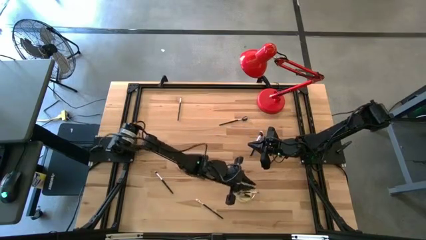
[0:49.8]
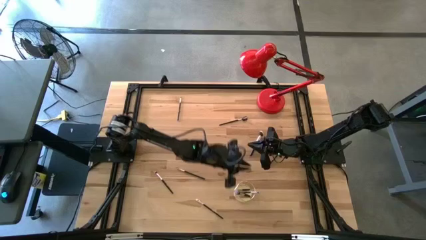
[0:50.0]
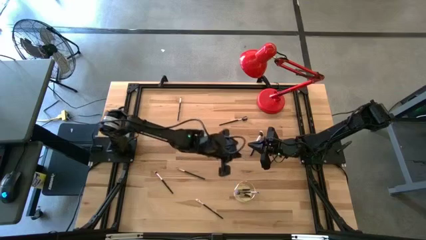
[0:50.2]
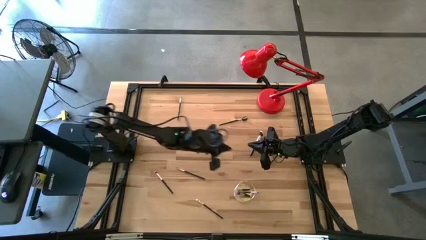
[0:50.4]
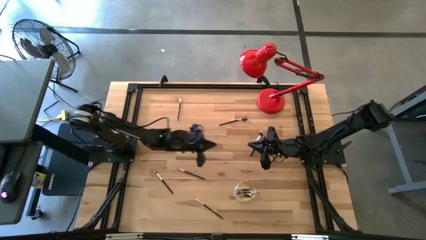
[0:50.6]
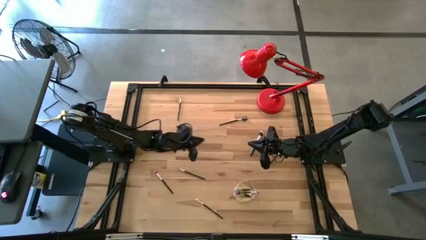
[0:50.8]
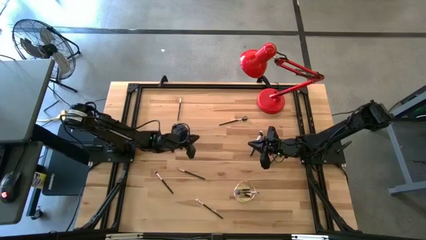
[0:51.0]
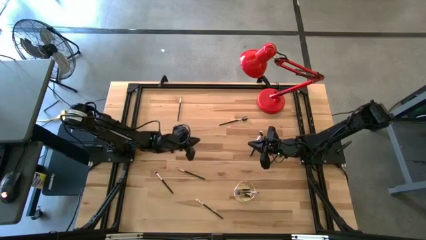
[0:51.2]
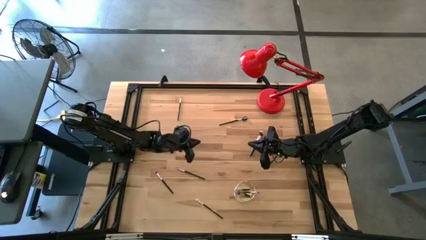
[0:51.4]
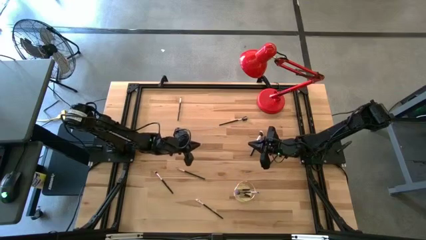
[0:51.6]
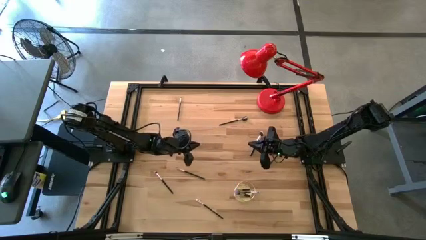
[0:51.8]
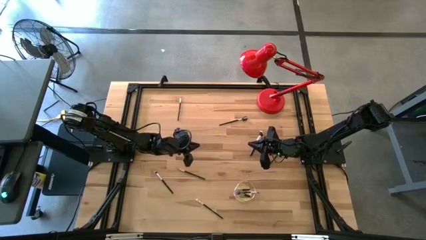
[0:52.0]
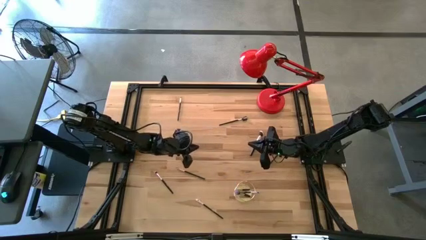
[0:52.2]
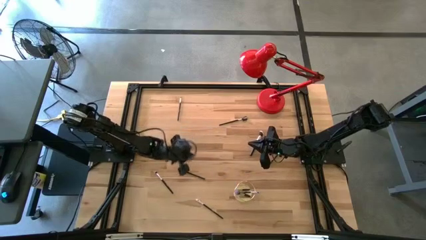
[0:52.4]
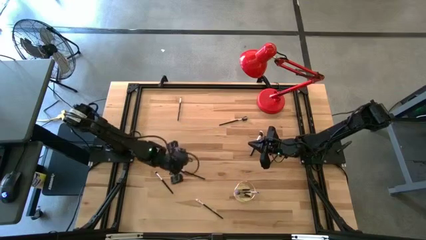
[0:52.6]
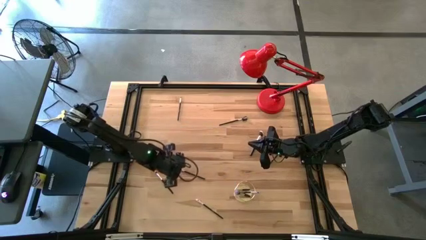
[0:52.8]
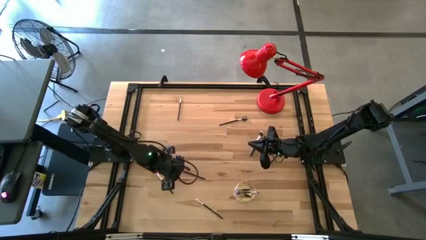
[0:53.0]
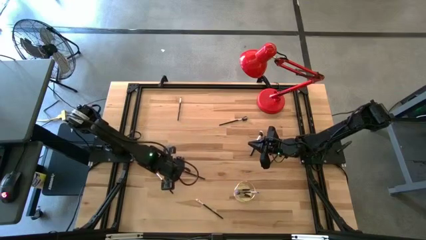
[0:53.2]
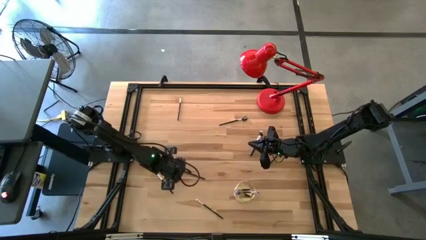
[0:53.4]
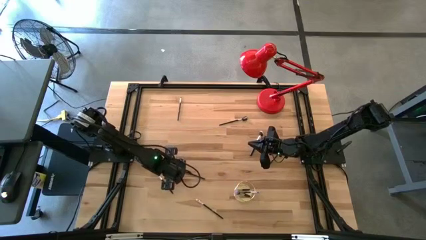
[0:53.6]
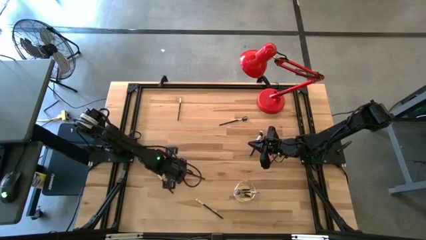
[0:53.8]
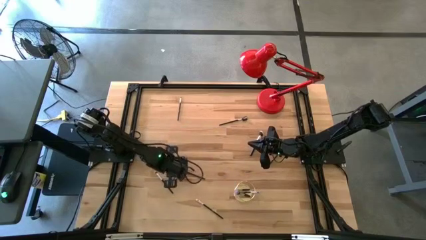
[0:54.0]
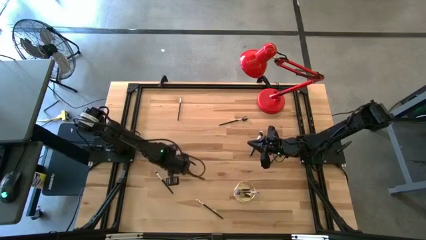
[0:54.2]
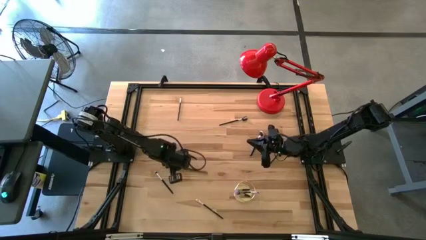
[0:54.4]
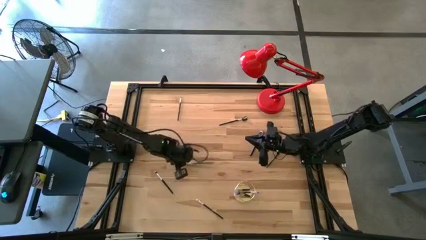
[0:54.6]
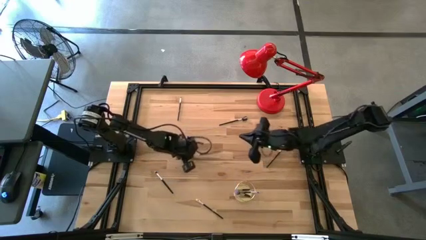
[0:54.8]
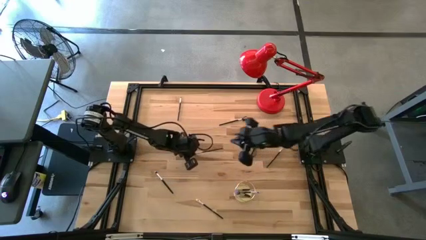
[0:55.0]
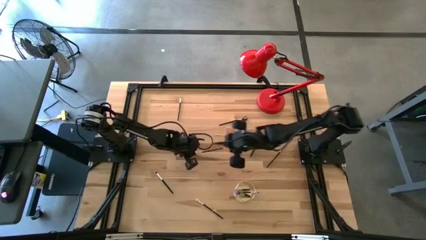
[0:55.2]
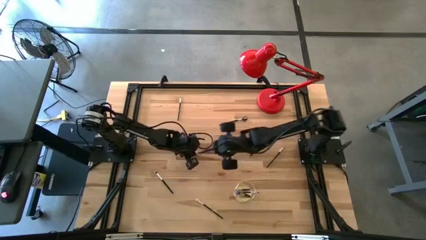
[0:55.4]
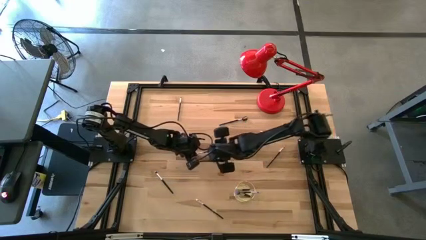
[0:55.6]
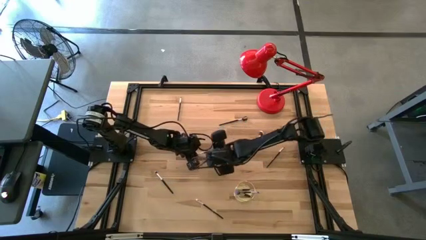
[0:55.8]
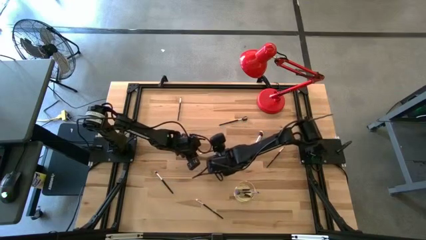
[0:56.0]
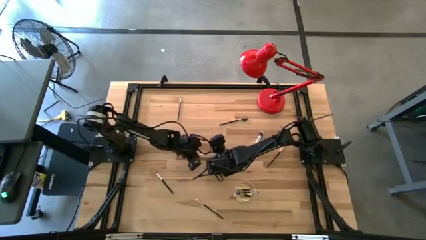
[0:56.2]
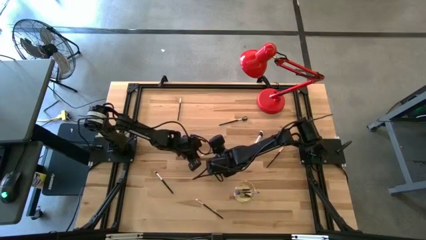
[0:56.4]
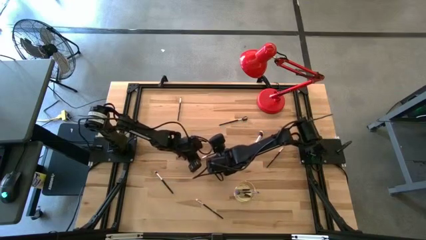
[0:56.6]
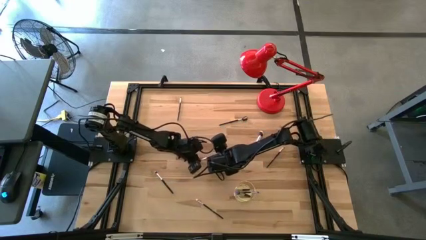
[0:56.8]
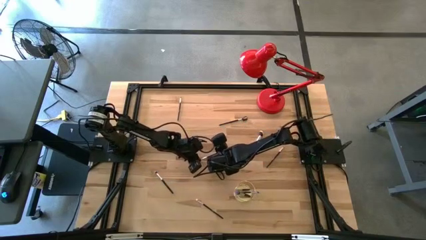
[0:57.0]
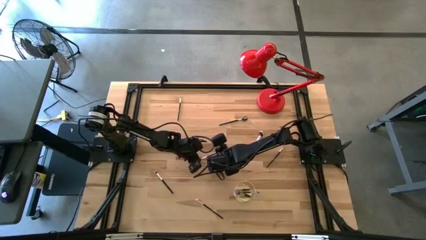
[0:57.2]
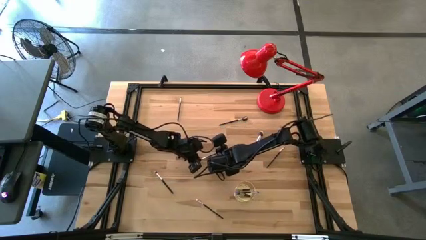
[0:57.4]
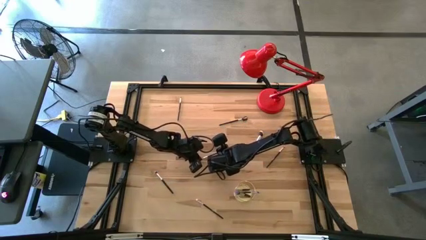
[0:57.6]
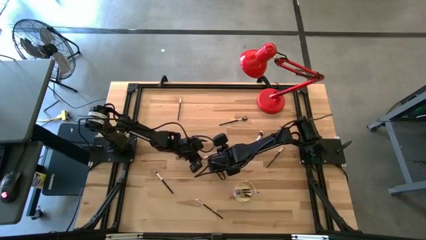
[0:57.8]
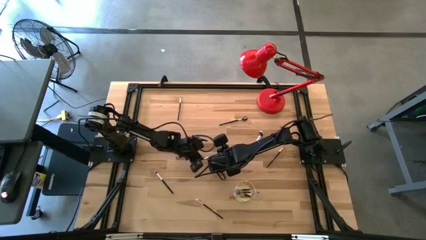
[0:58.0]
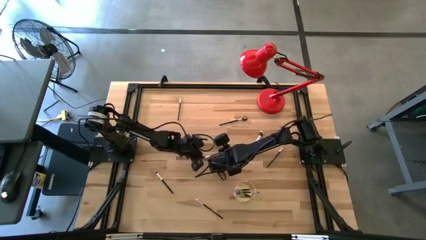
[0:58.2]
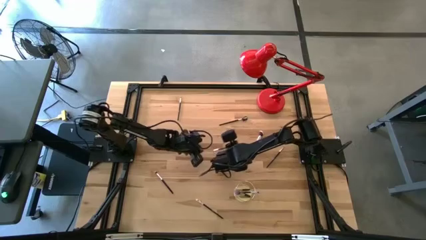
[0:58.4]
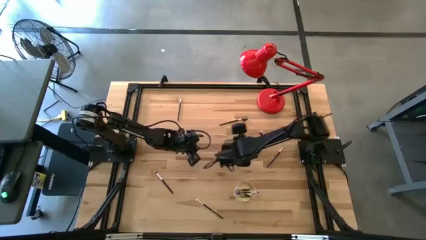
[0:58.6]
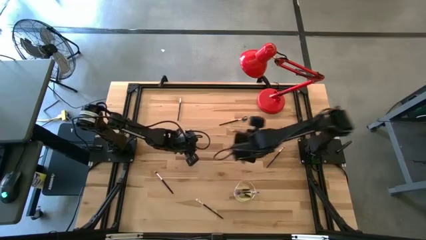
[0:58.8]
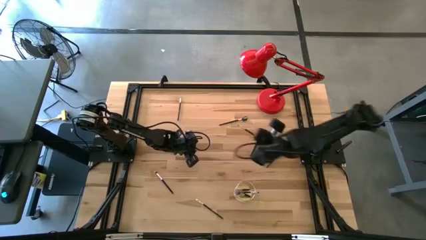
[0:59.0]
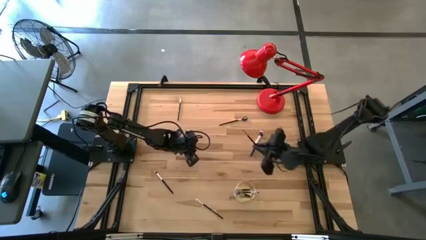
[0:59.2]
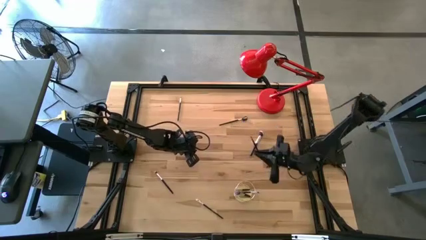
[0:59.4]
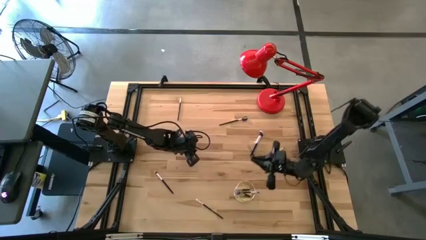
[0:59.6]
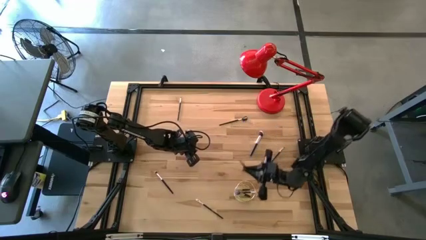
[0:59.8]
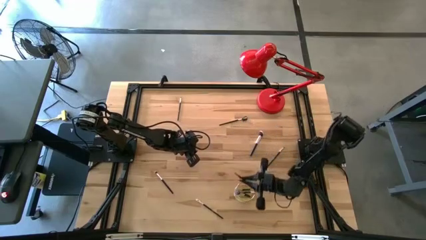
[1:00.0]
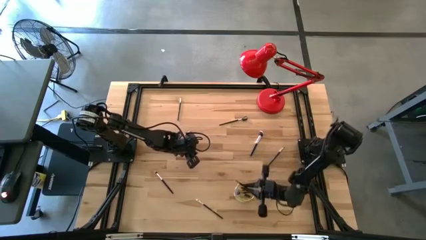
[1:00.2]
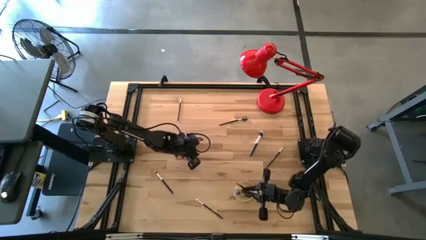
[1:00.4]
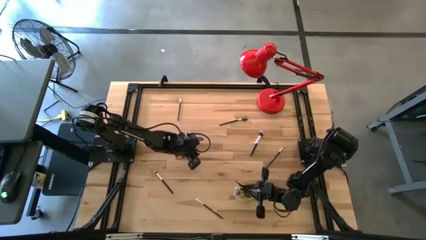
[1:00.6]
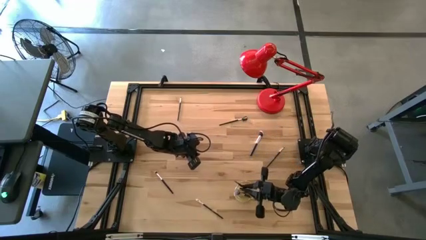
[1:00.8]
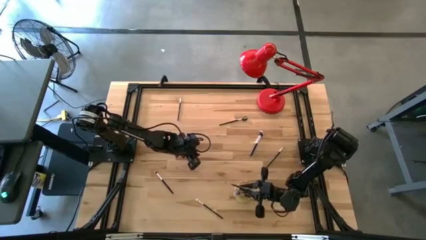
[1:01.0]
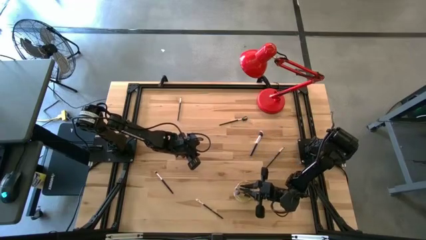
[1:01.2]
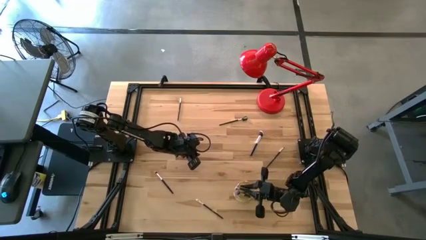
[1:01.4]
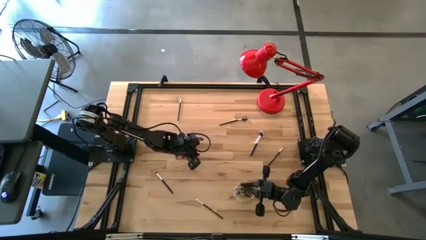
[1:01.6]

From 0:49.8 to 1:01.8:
Task: Pick & Place Makeup Brushes
Put the eyeshadow brush into the gold makeup holder

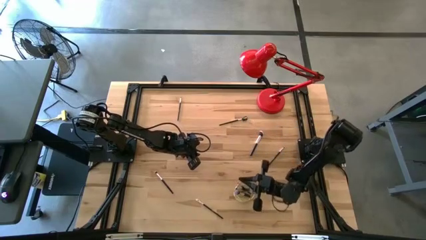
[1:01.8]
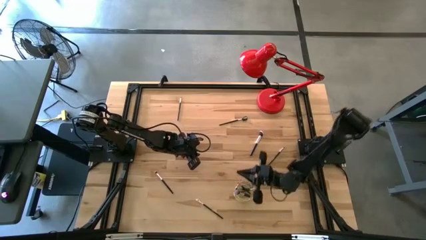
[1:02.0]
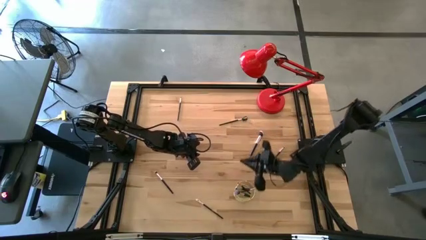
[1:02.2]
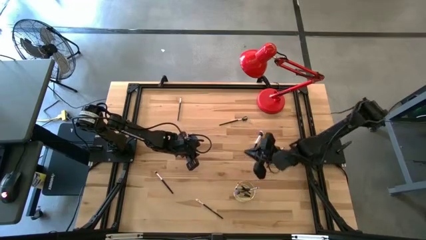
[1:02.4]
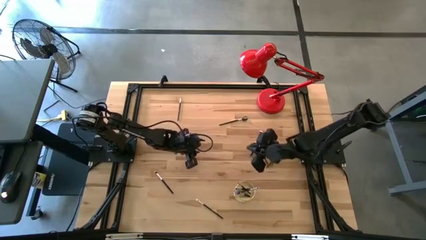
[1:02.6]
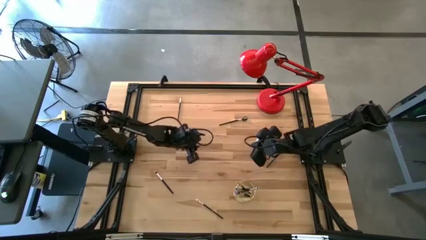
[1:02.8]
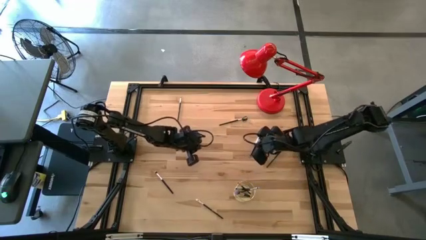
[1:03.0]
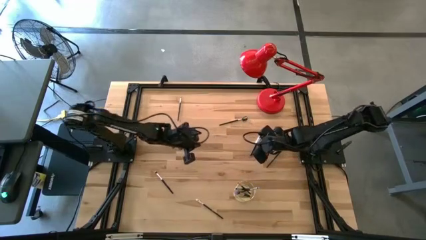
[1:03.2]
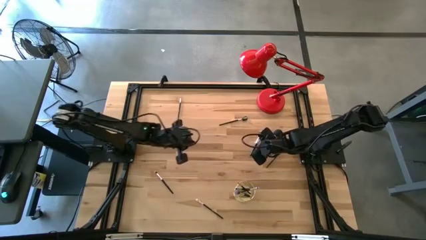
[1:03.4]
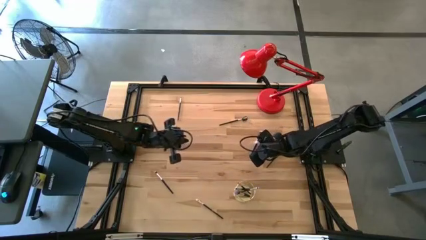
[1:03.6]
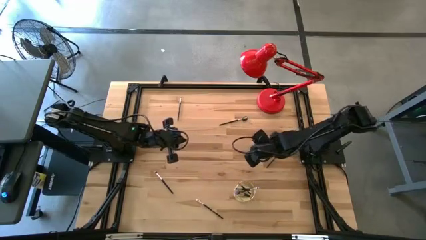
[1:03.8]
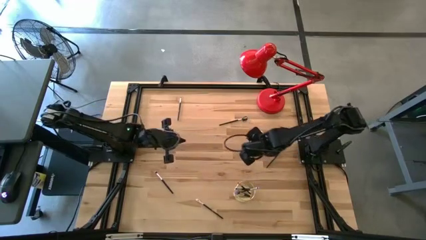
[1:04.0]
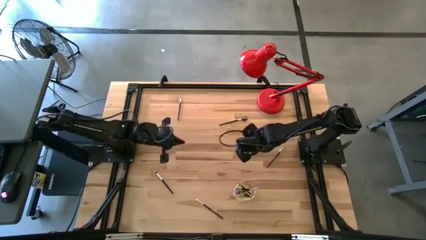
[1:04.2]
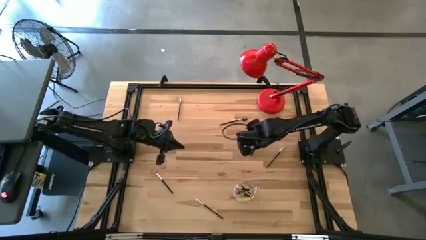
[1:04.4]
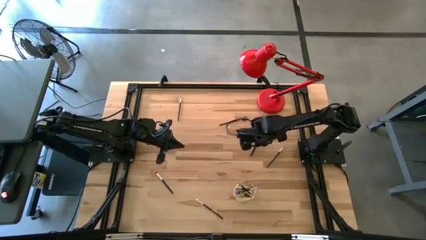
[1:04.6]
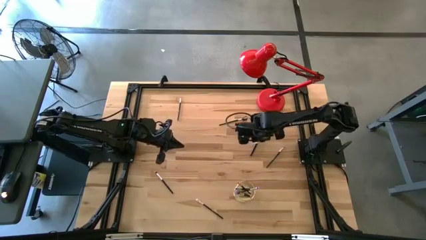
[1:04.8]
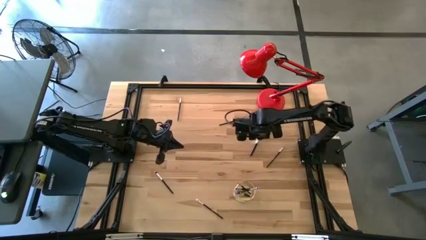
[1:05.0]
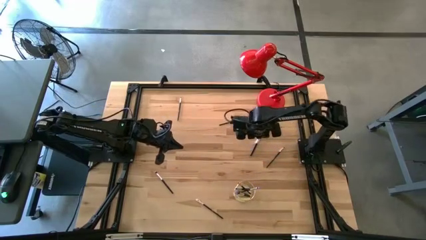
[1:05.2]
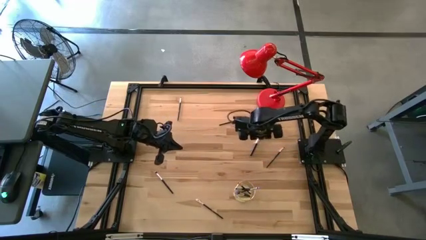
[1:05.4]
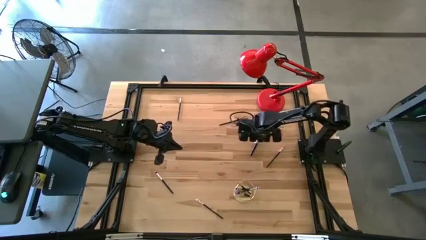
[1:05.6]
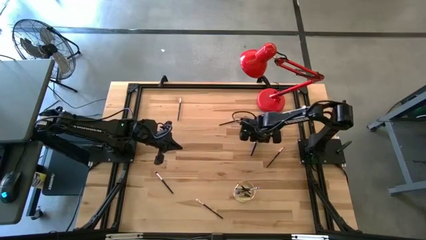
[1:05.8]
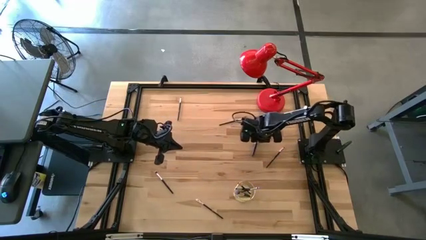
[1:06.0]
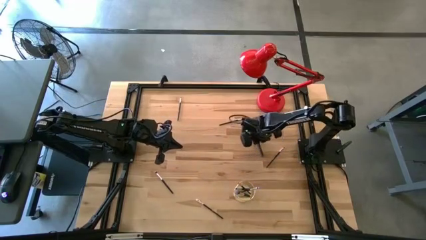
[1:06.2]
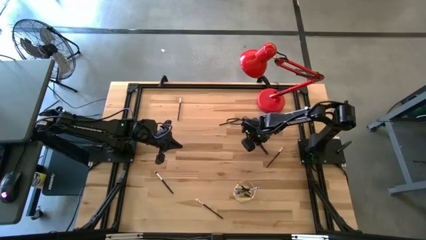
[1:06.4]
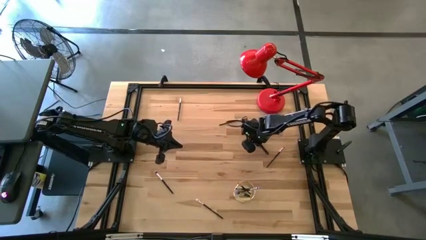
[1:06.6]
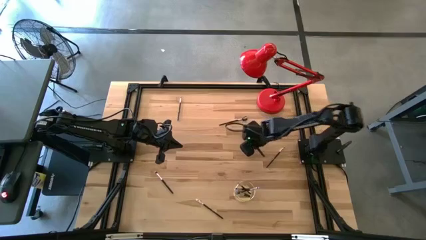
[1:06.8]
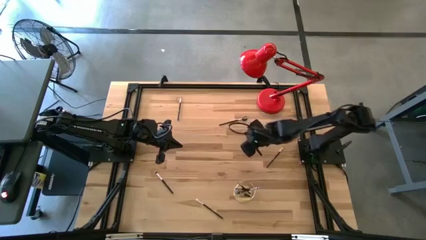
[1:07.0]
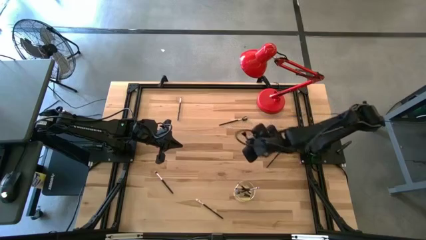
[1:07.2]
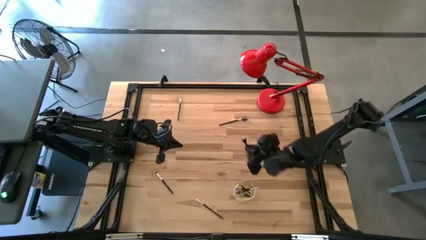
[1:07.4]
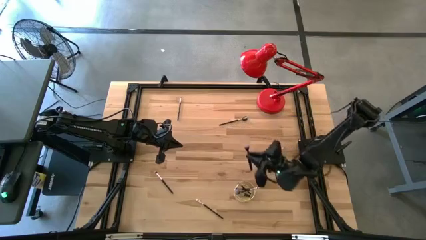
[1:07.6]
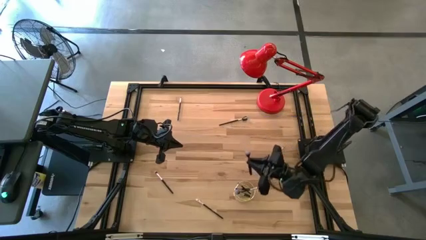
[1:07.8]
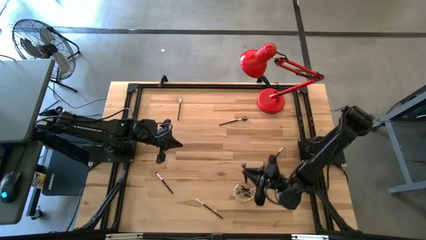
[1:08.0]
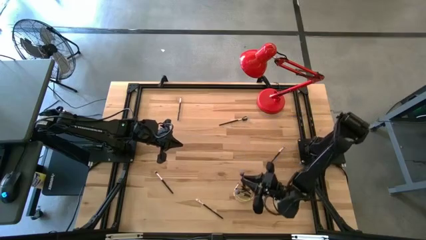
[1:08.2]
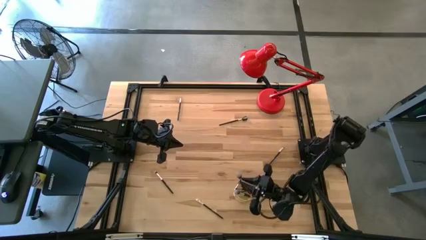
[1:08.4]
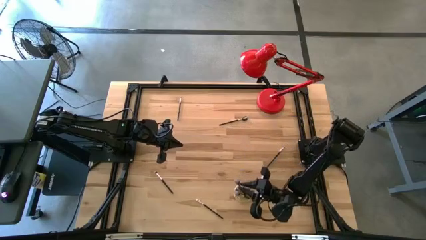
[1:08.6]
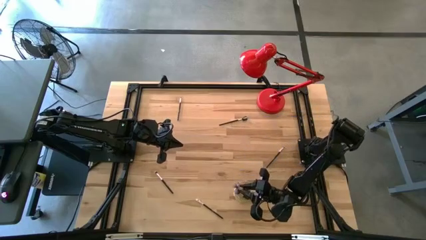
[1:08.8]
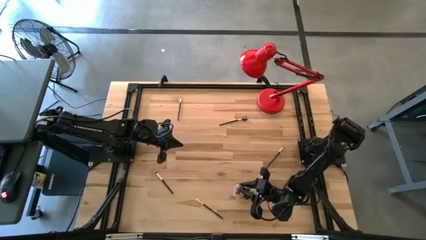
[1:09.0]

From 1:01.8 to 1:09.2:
Put the powder brush into the gold makeup holder
